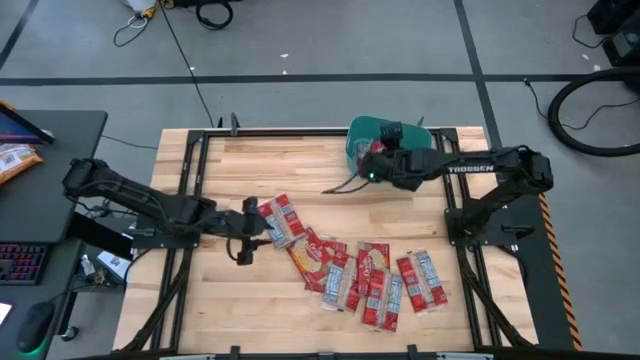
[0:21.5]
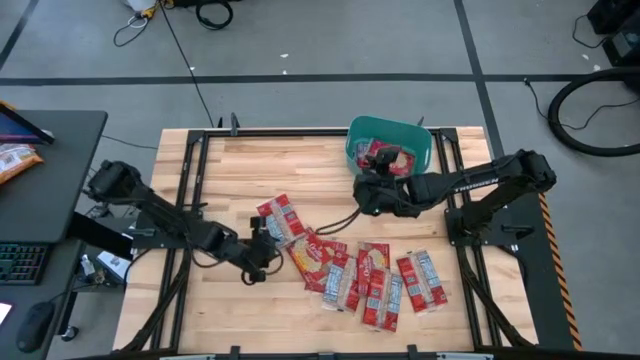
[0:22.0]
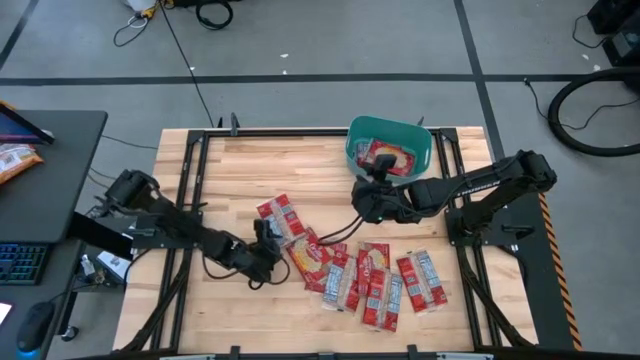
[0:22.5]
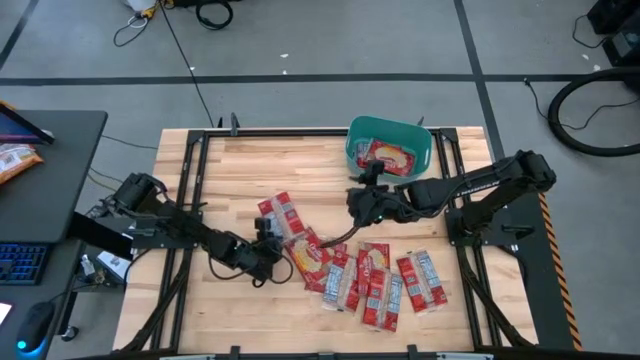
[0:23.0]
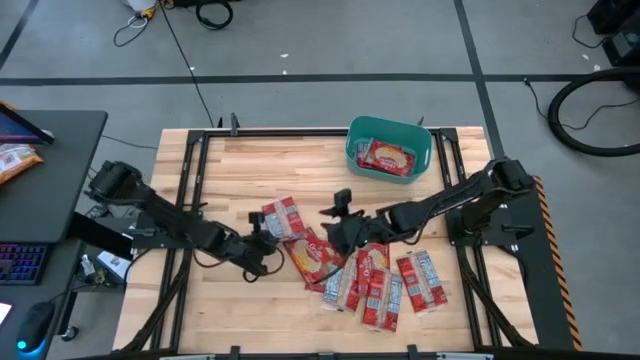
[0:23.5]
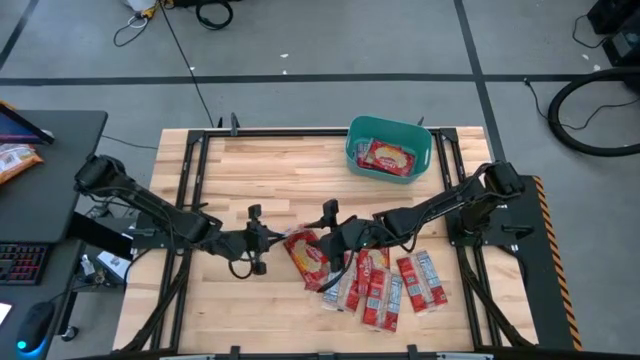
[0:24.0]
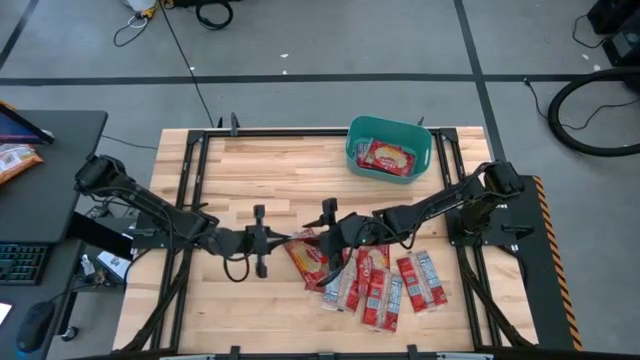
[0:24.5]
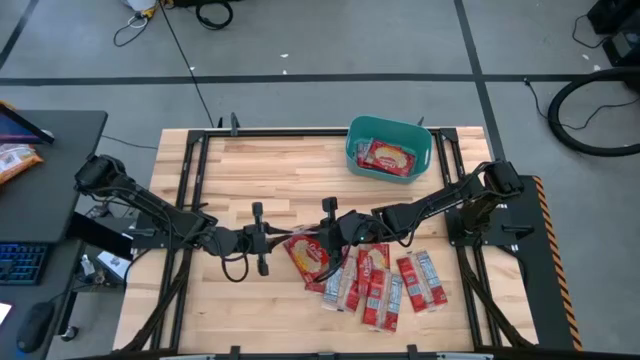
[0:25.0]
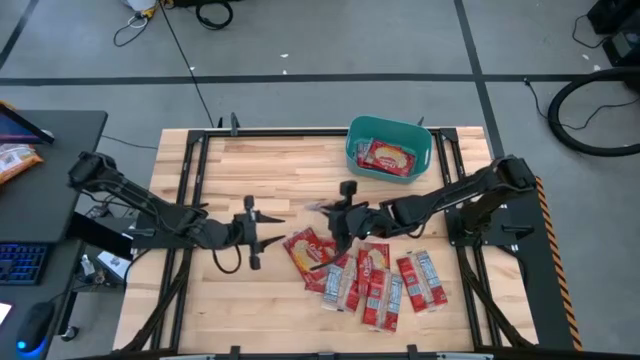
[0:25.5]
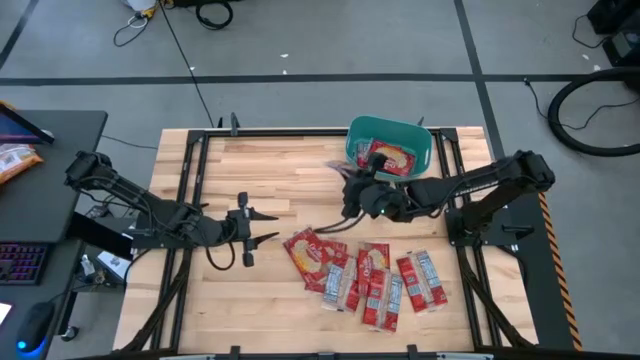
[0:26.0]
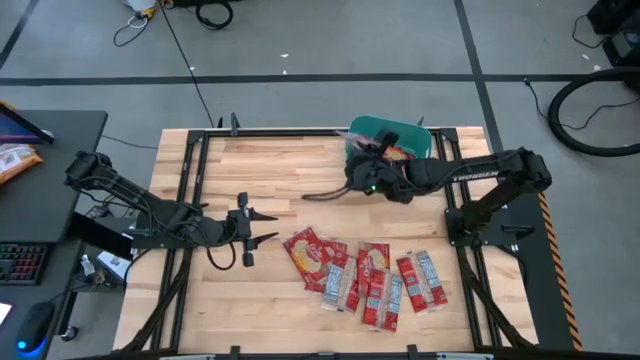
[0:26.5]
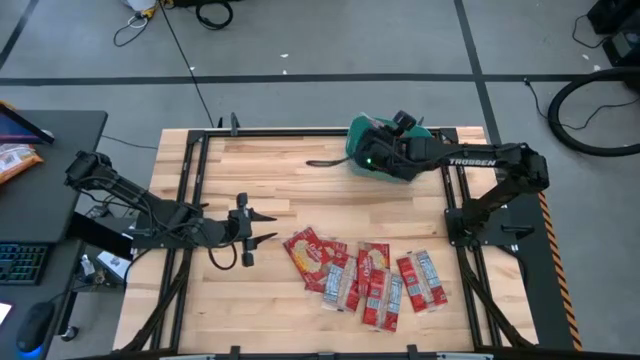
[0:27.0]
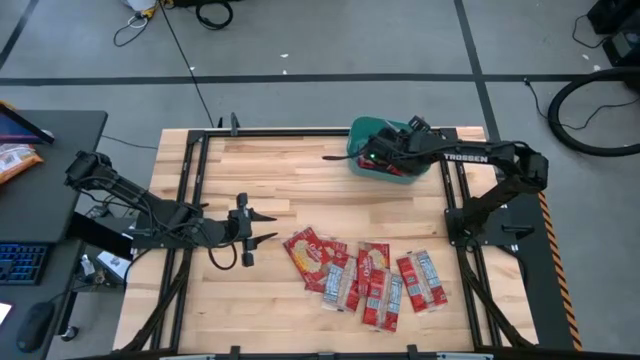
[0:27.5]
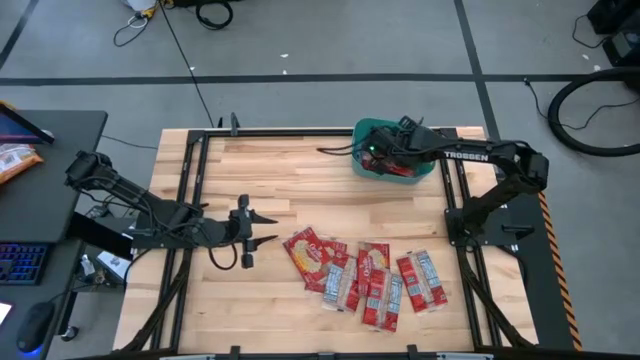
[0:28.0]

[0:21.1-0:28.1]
Task: Sort popcorn bags into baskets
Put the red popcorn bag into the green bin

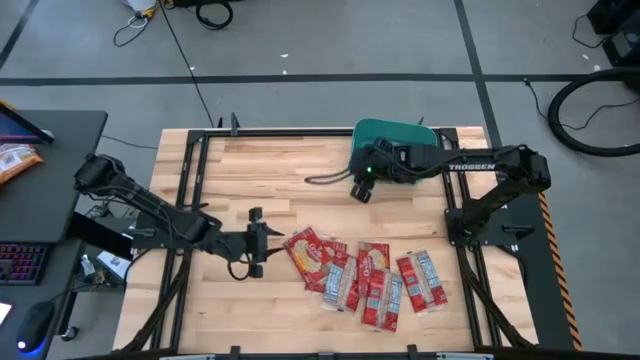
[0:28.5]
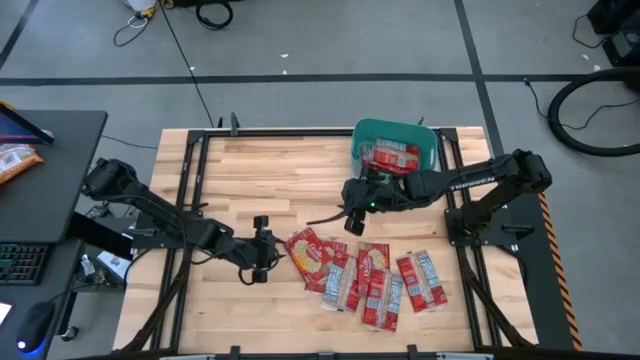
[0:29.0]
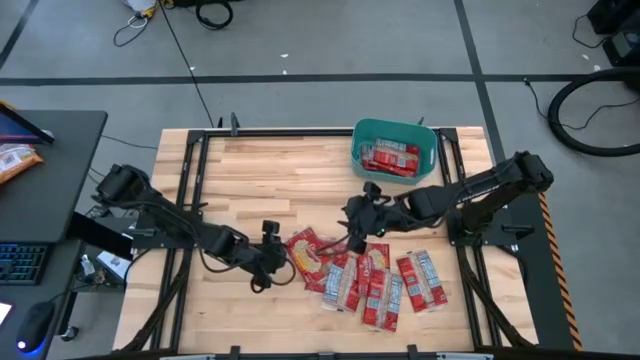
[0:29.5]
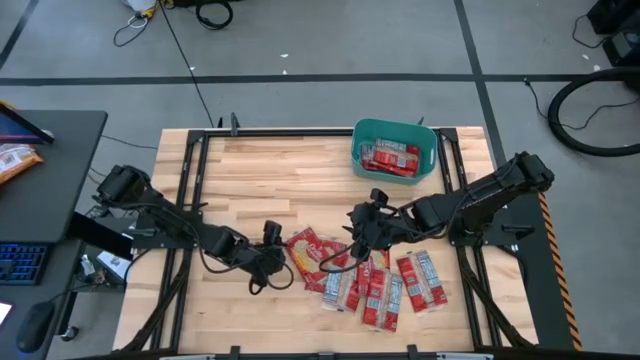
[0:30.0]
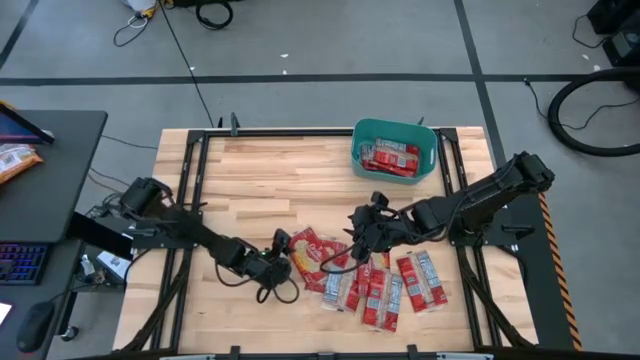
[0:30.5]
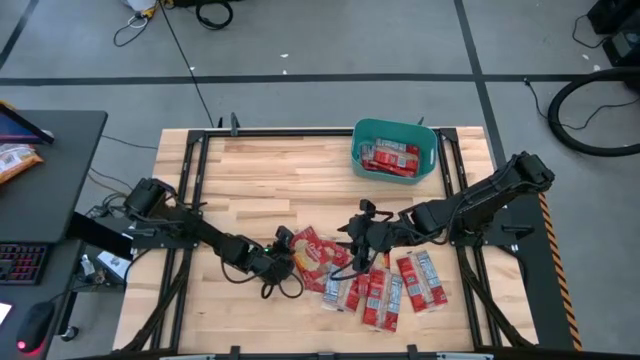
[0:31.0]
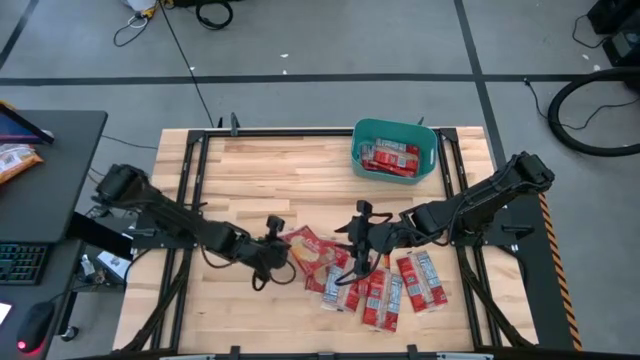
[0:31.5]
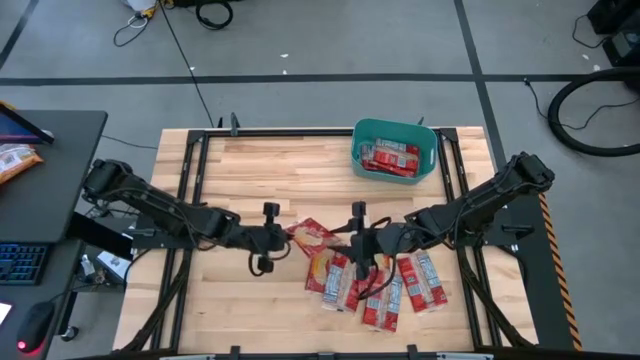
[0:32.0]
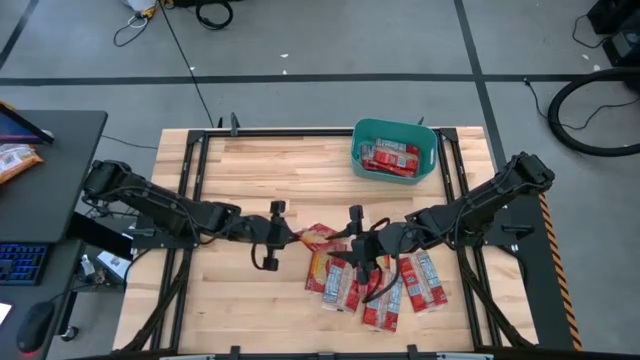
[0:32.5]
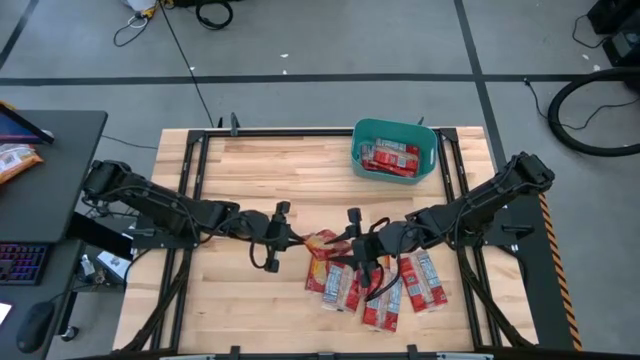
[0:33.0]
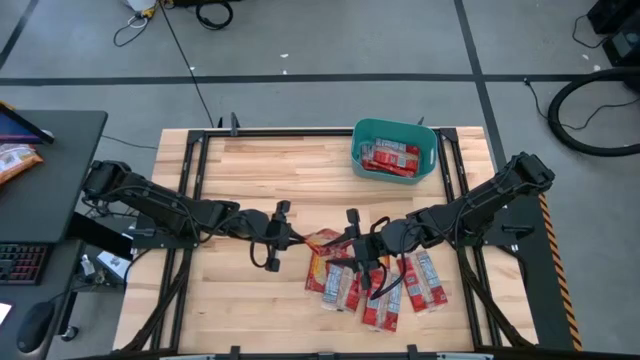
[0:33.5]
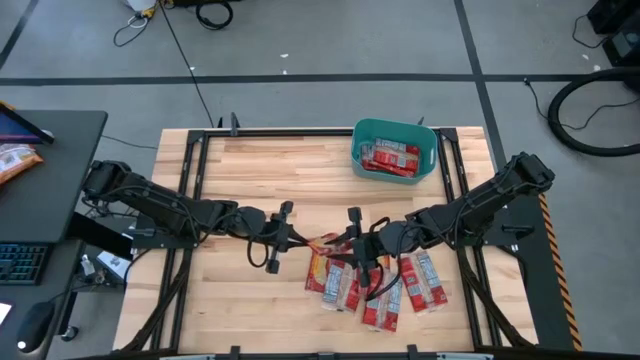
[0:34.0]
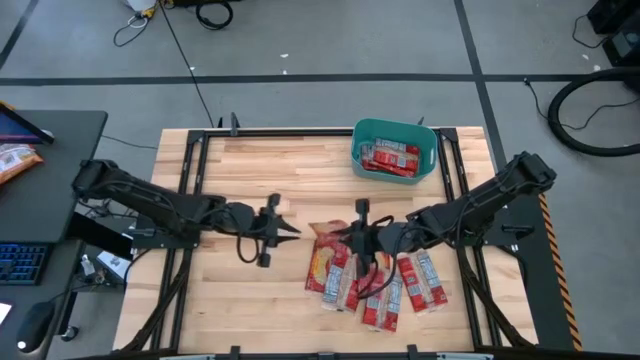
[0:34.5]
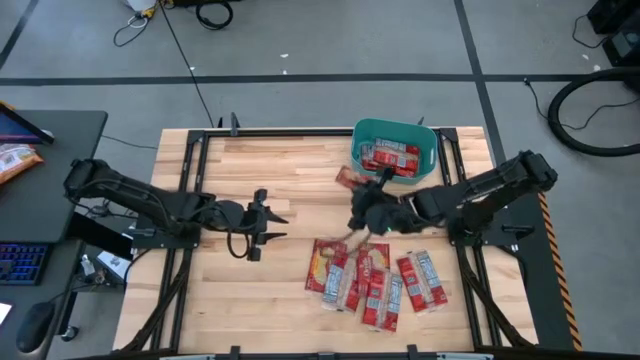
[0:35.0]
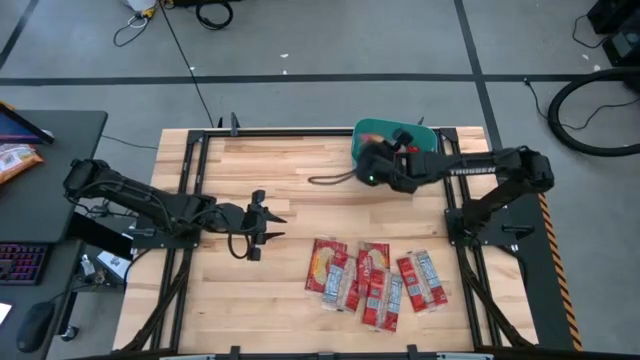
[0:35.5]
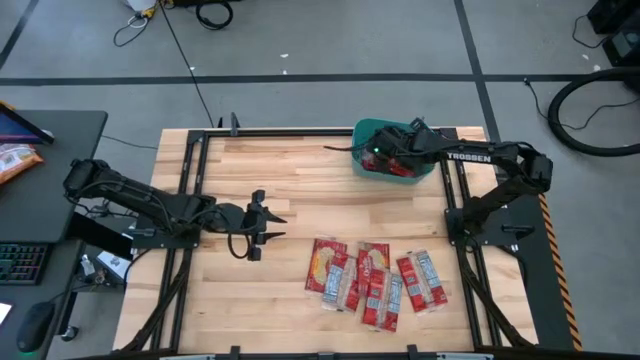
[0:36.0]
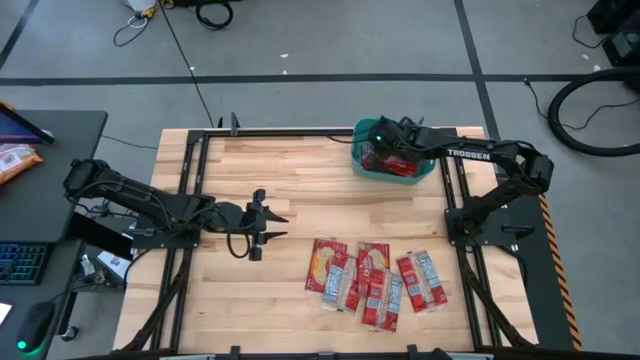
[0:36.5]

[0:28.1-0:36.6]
Put the red popcorn bag into the green bin

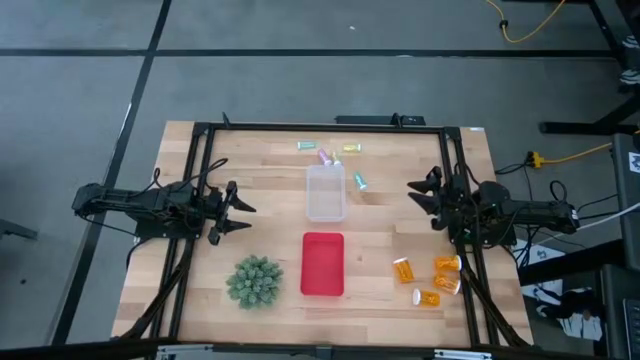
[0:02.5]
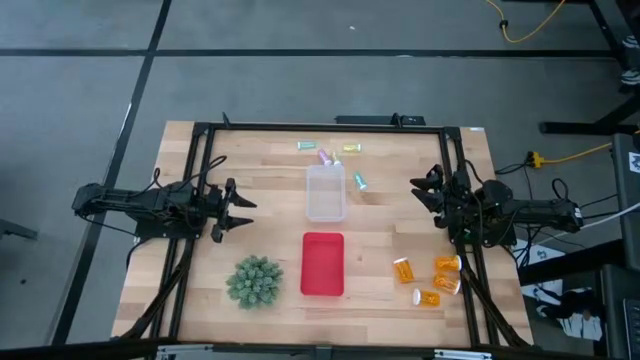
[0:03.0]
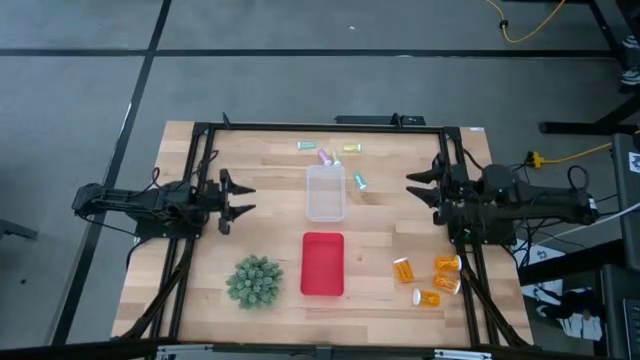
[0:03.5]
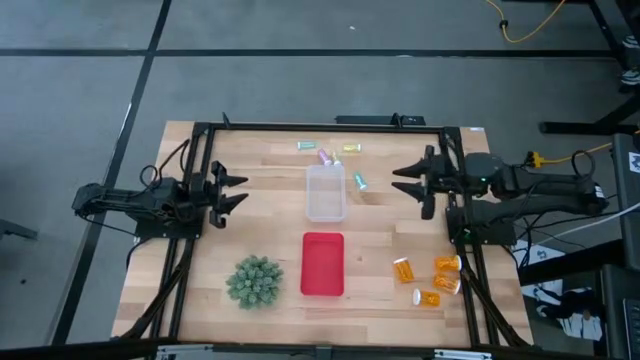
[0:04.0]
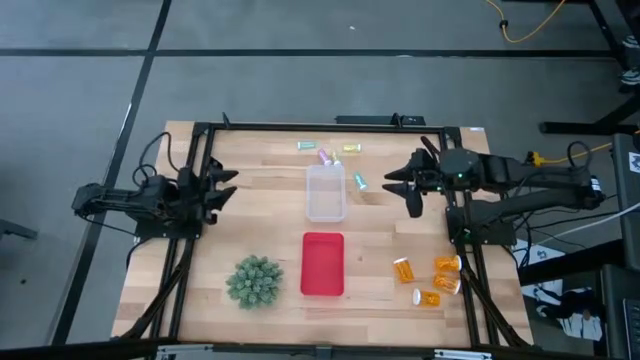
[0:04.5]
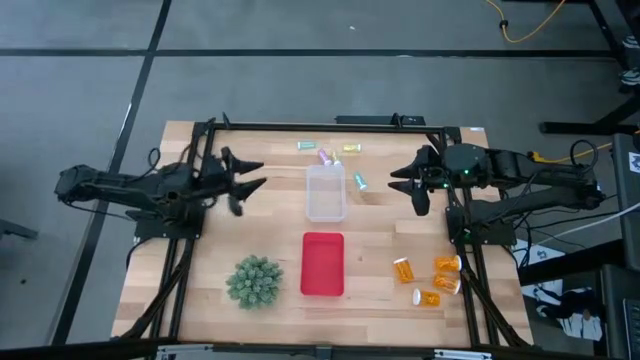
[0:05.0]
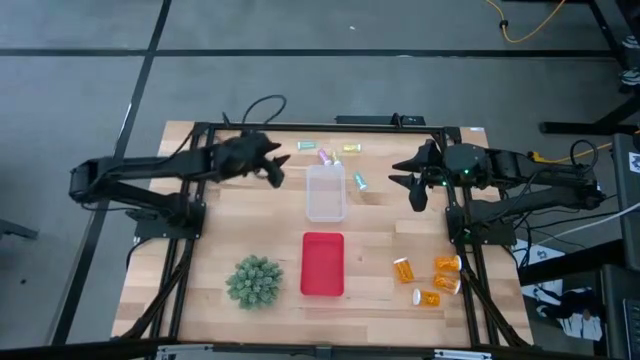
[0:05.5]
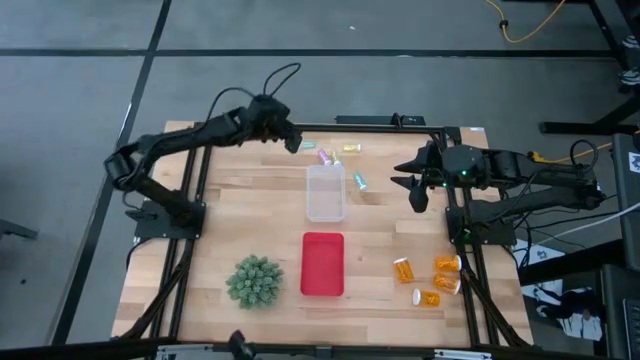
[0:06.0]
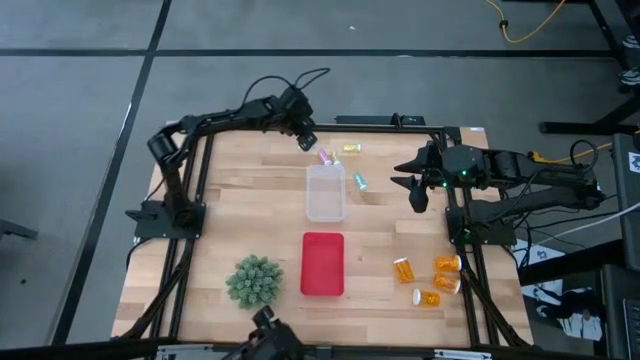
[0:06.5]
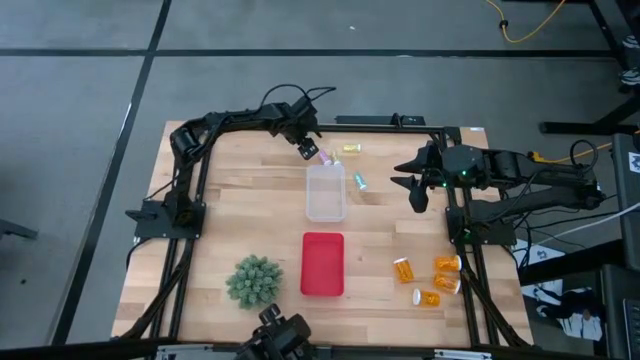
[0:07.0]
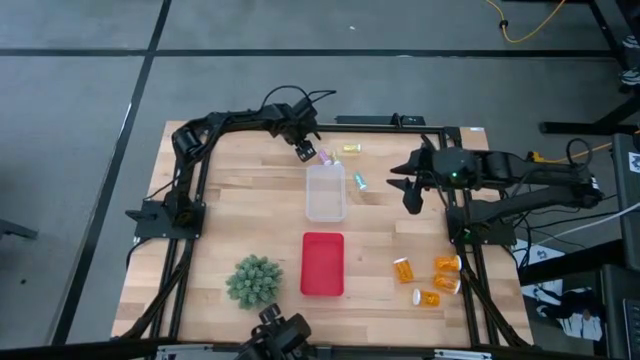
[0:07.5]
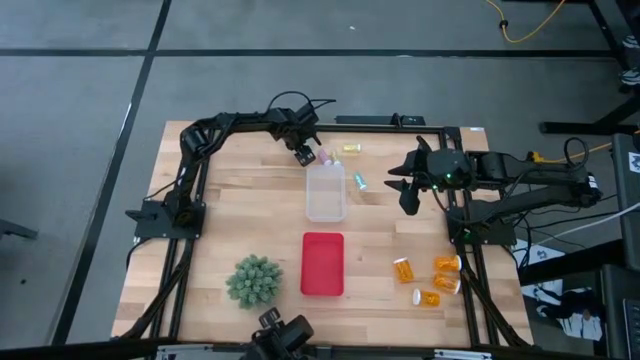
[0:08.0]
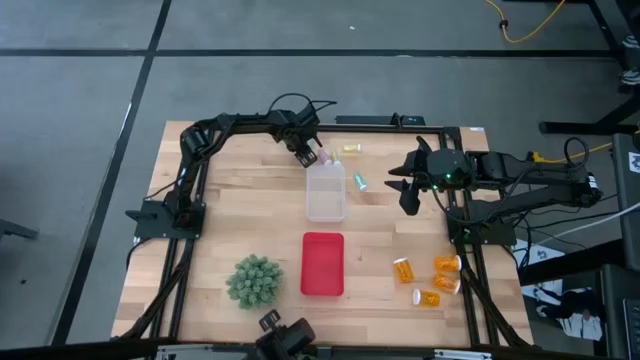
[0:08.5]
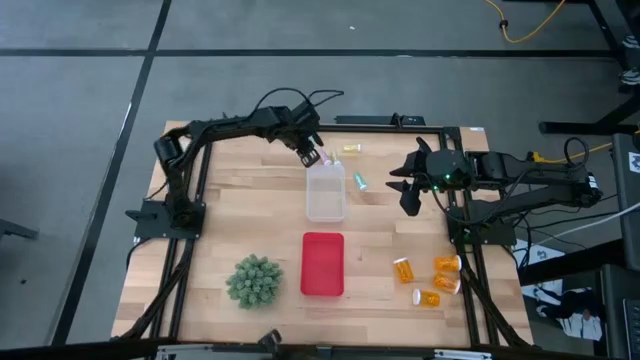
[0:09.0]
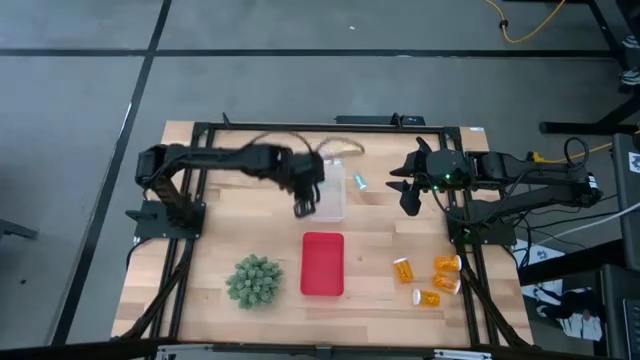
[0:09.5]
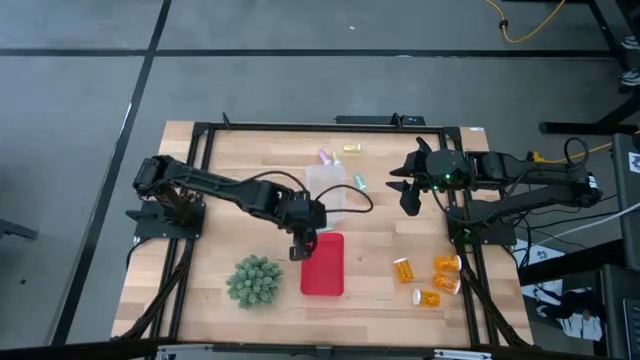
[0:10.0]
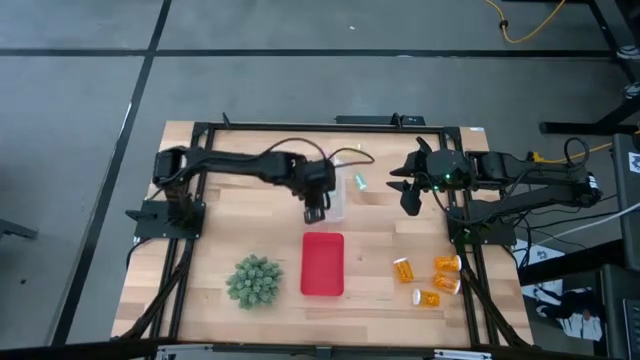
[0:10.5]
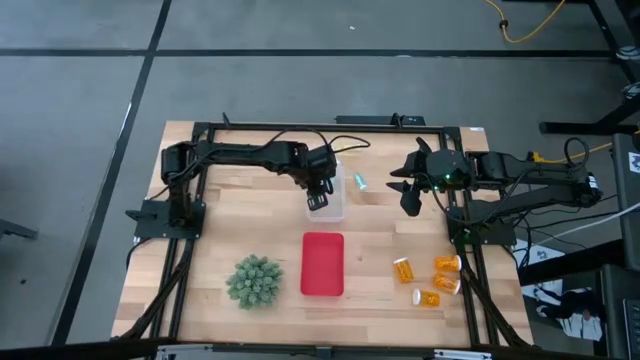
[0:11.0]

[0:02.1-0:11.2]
Task: Pick and place medicine bottles into bin by pill shape (circle, oval)
Put the top small blue pill bottle into the transparent bin
